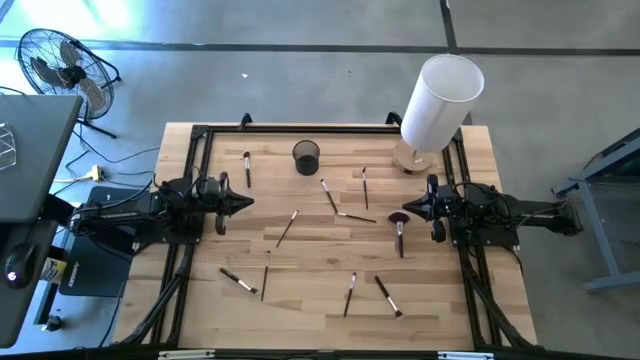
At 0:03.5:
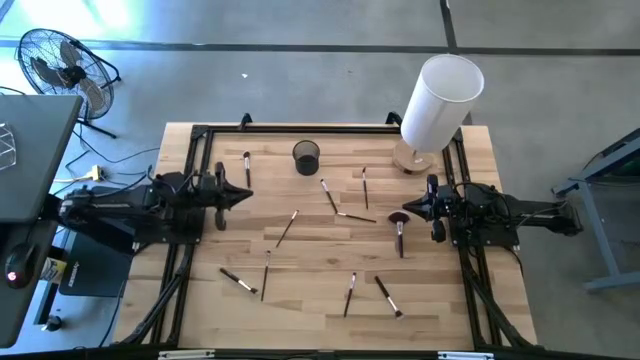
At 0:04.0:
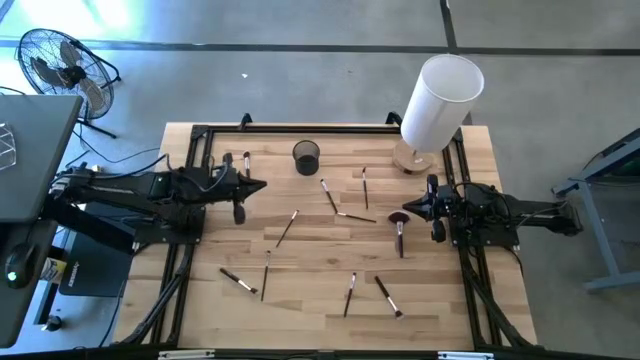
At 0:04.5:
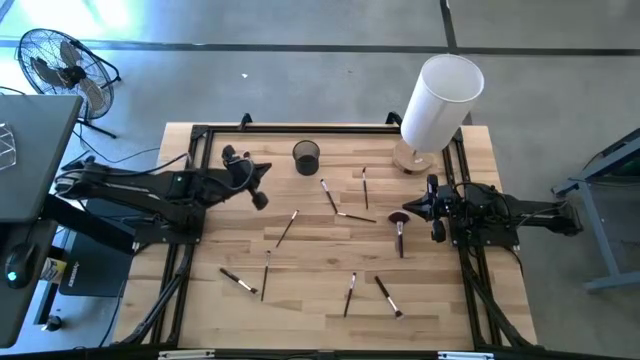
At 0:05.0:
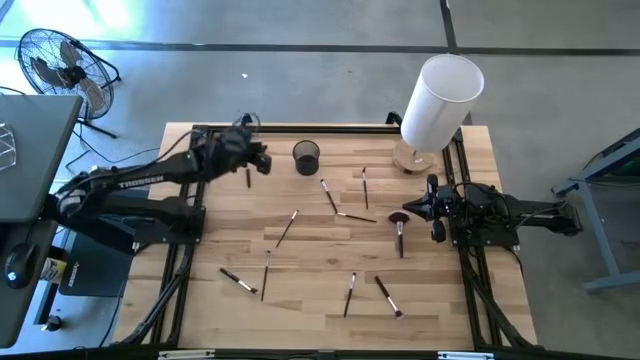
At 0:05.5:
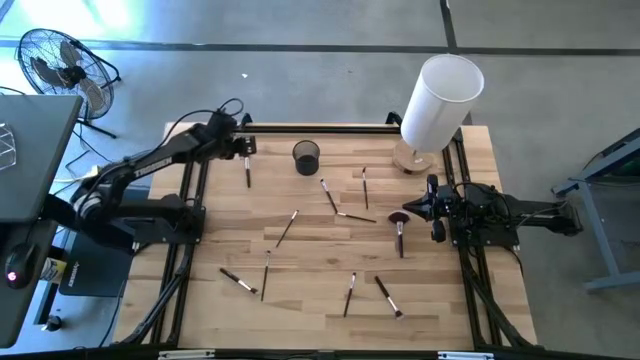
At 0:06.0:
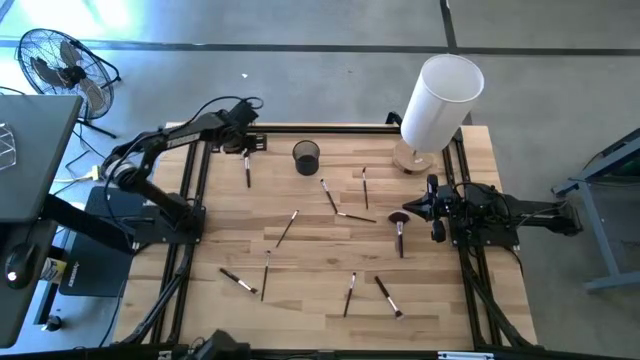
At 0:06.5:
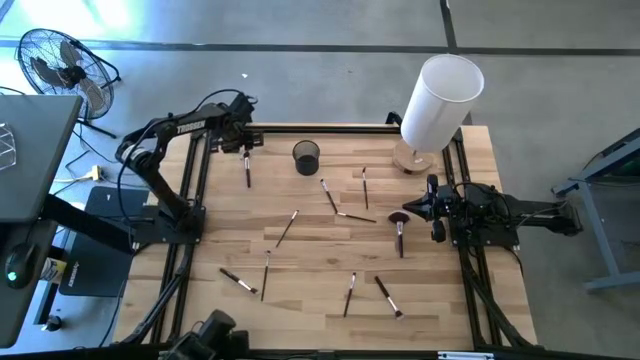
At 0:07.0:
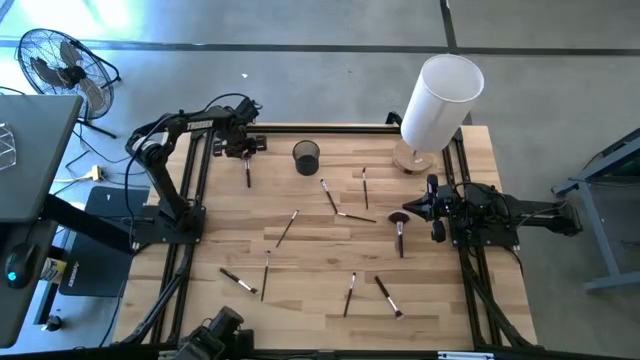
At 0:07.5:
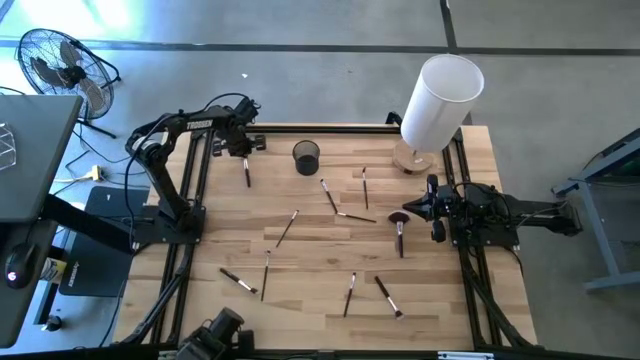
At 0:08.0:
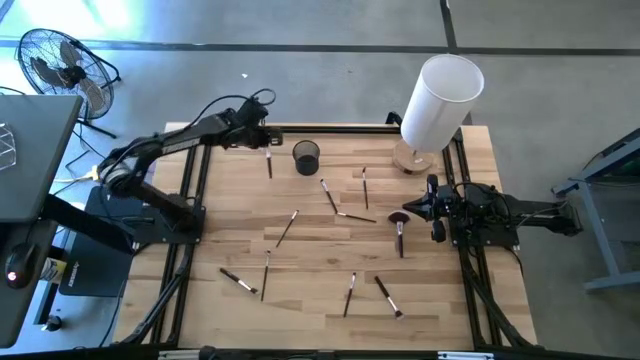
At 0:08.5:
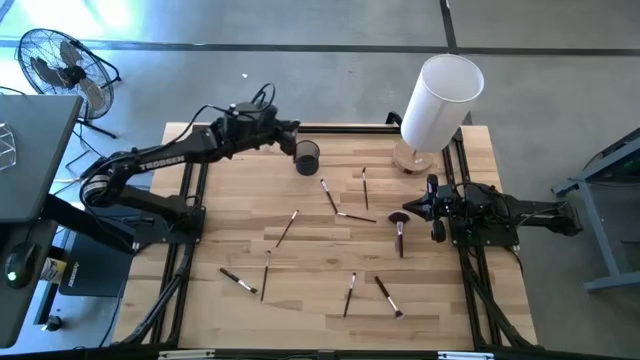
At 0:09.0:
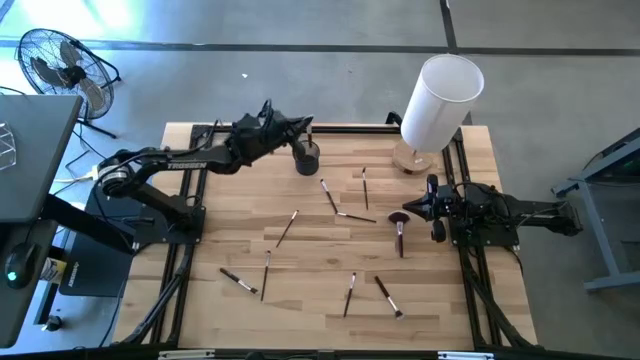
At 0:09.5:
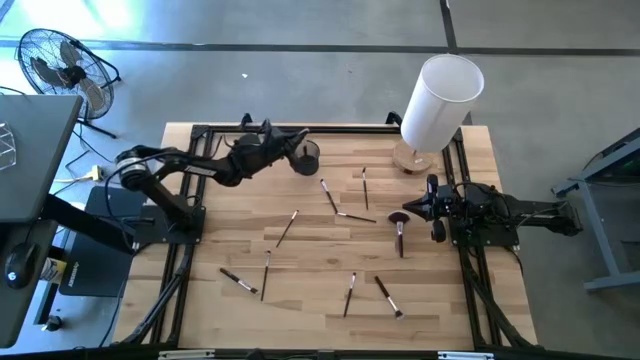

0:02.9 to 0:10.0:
Task: Put items in baskets/containers
Put the powder brush into the pen holder

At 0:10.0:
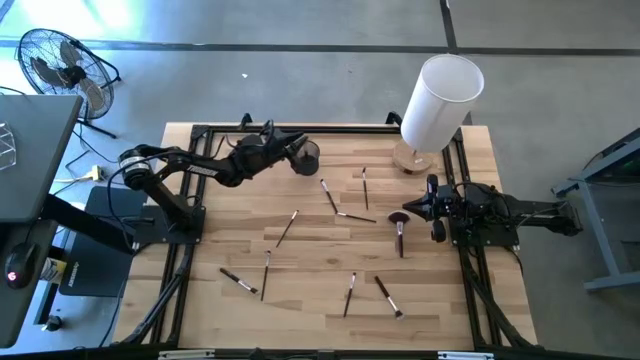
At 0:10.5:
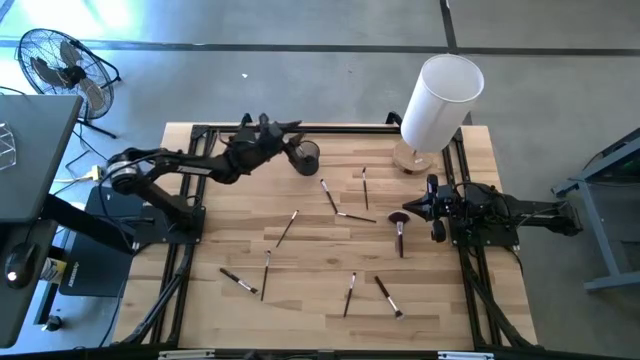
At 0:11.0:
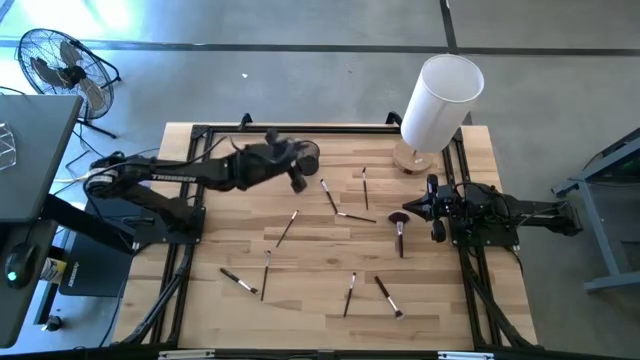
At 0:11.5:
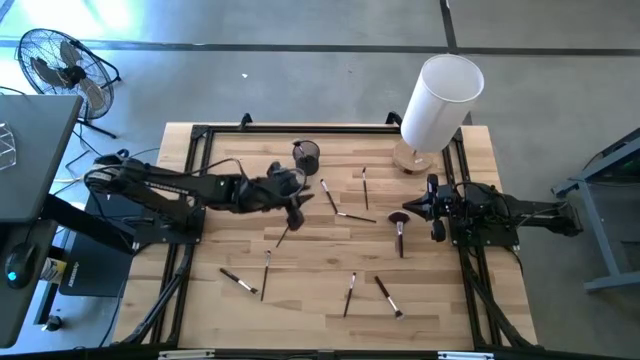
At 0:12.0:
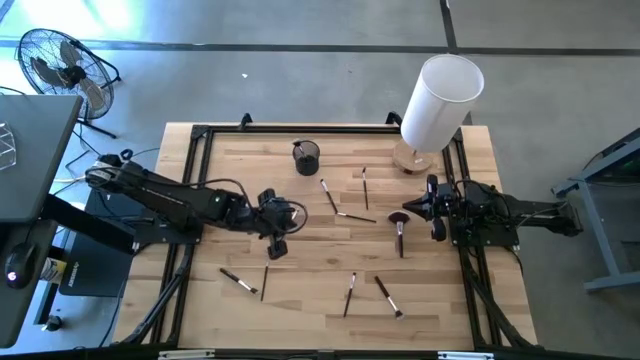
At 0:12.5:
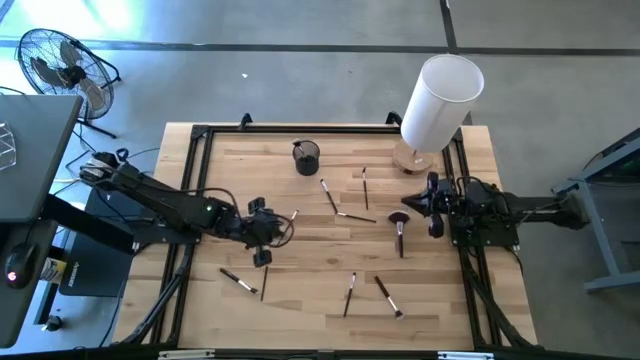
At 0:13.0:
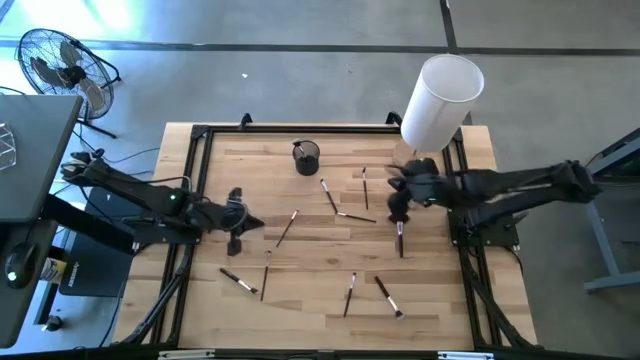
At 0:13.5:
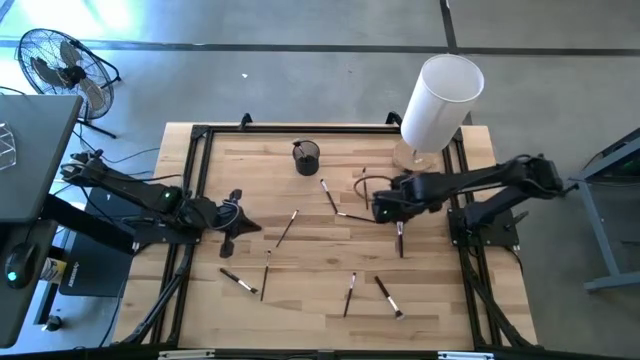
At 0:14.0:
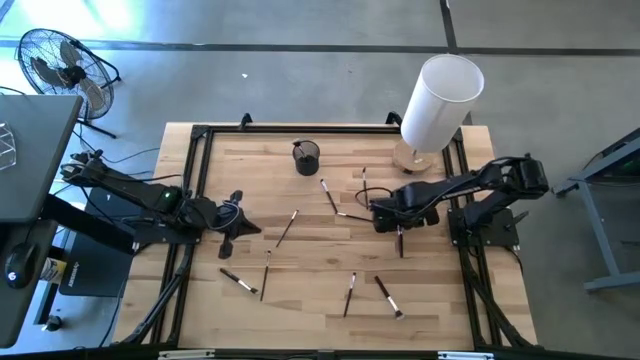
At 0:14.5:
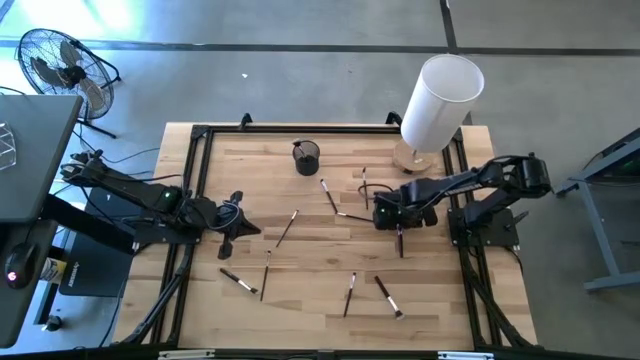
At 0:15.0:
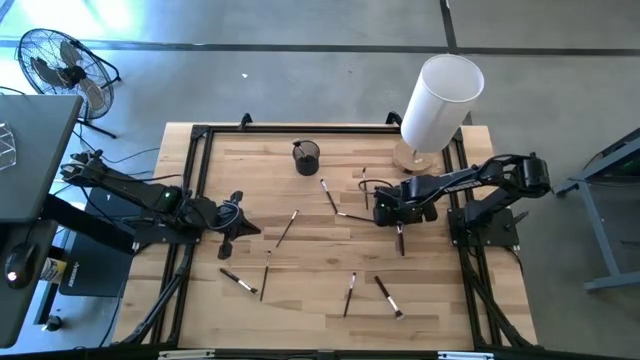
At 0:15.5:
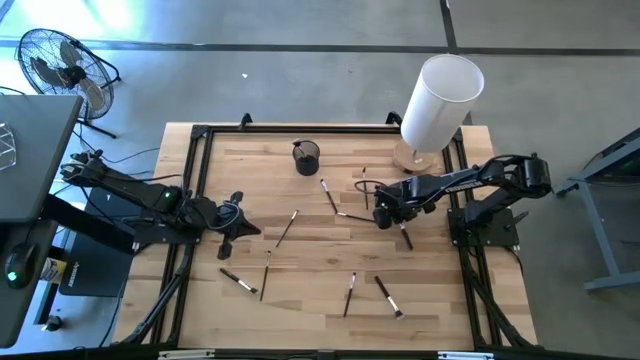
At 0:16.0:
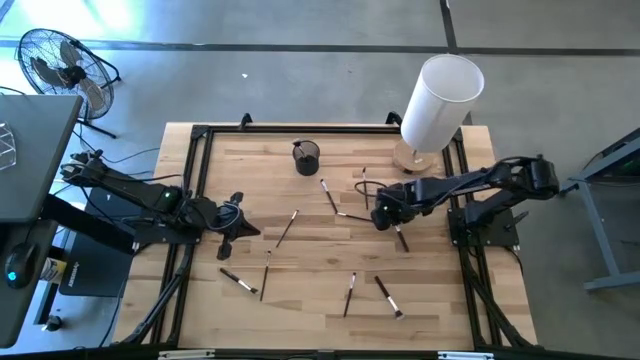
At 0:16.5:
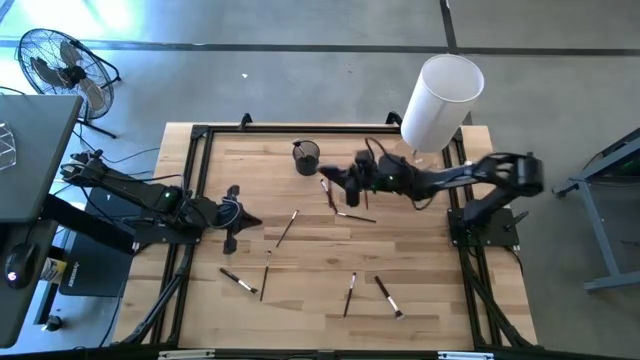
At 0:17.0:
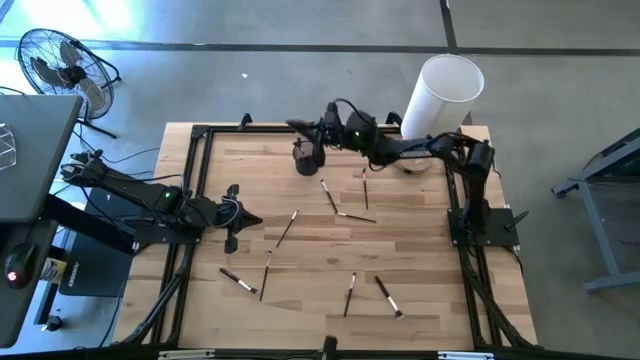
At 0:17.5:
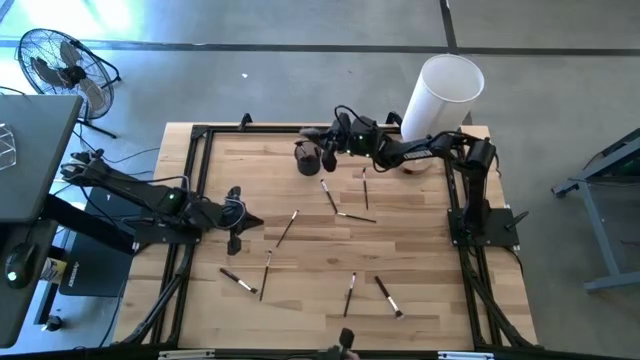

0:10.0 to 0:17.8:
Put the highlighter brush into the pen holder

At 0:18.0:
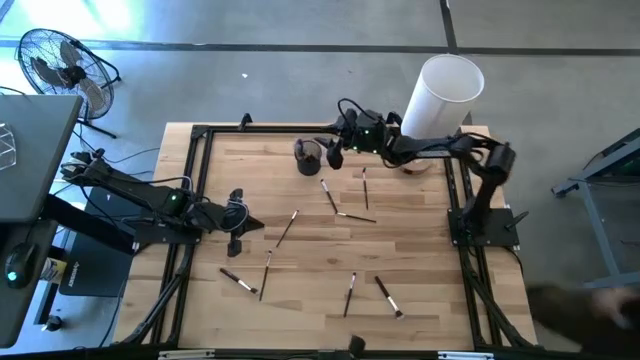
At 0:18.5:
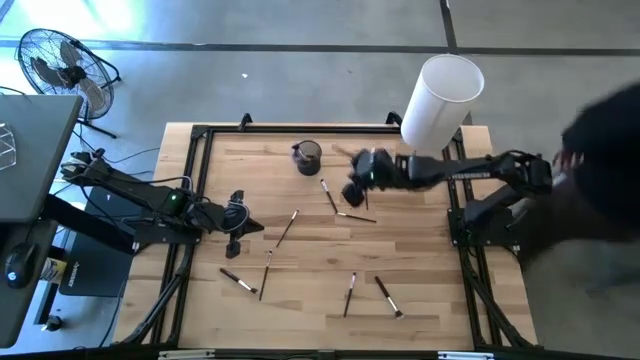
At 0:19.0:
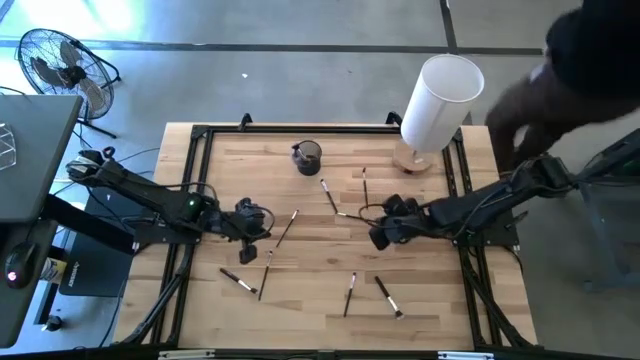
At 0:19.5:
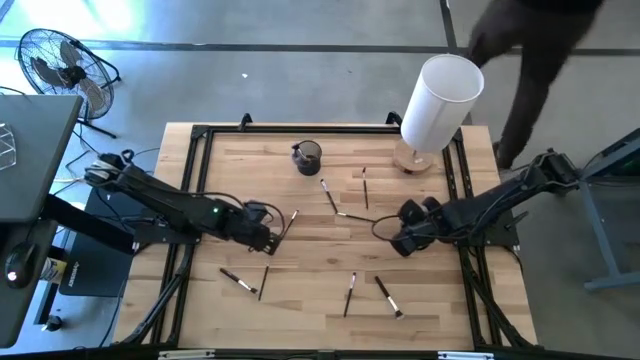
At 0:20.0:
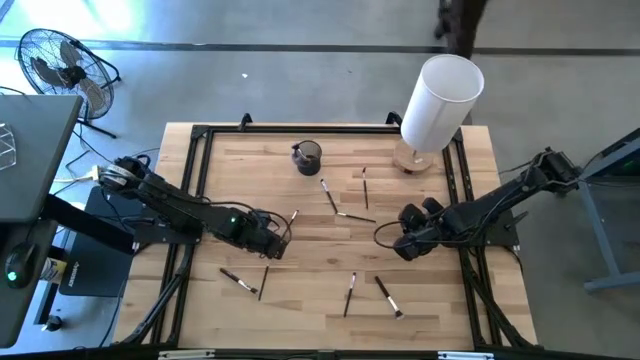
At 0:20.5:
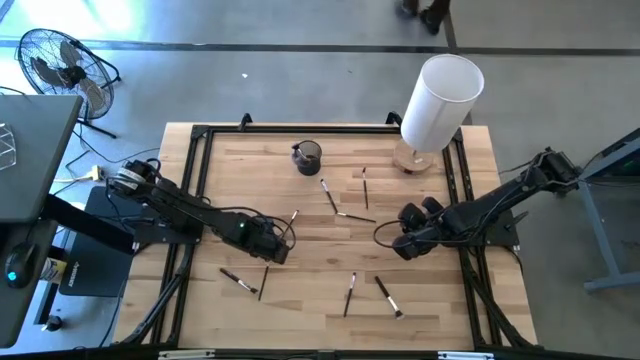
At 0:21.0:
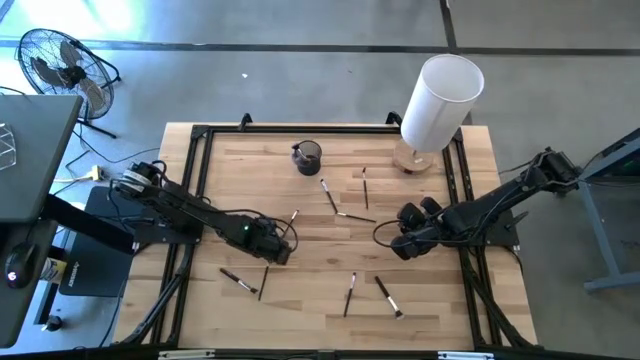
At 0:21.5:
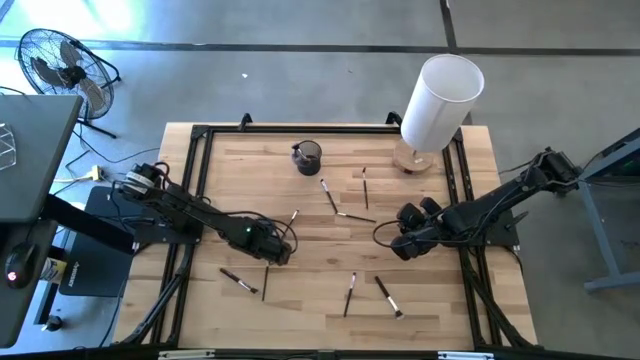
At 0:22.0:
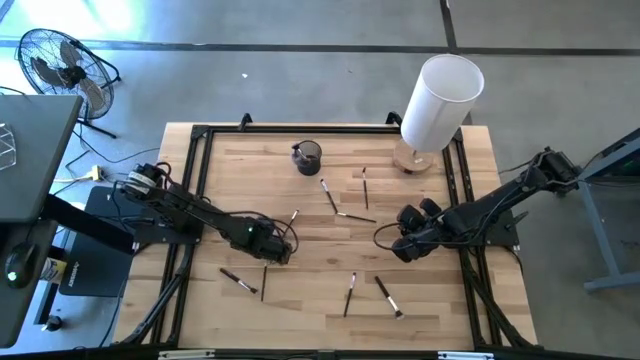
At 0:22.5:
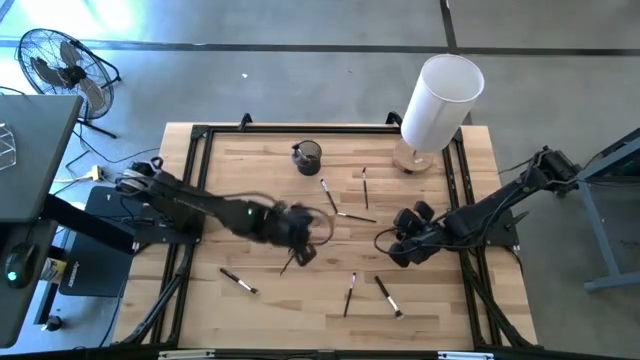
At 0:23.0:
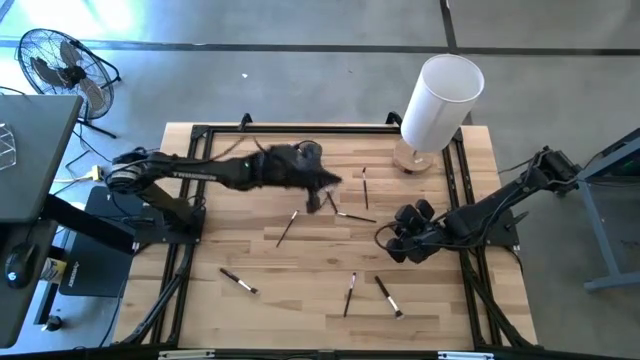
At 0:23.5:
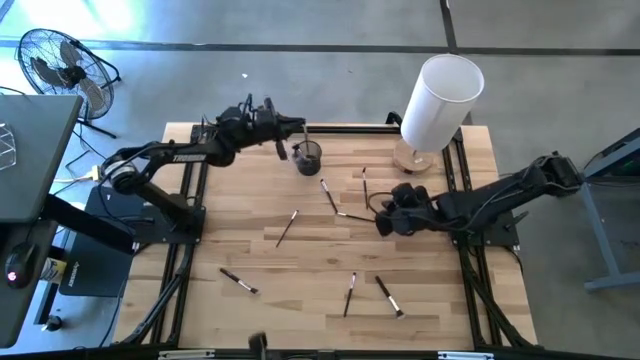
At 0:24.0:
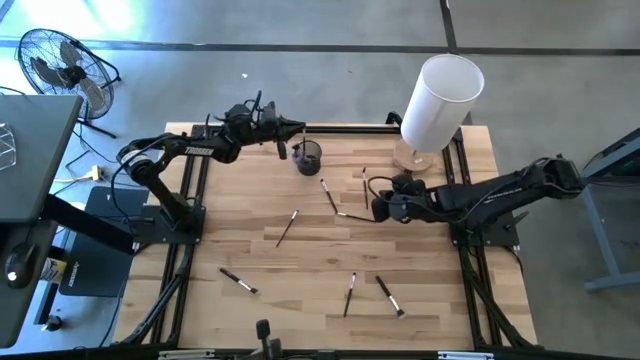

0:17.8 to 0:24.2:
Put the eyeshadow brush into the pen holder

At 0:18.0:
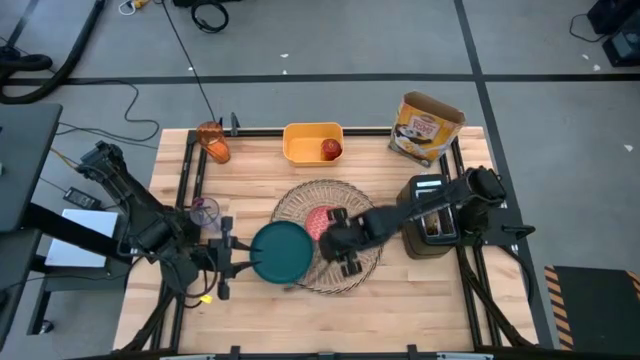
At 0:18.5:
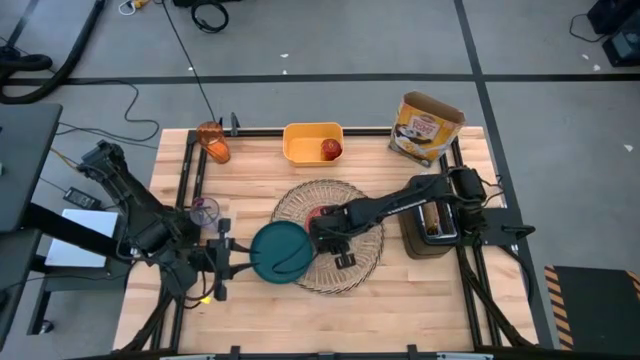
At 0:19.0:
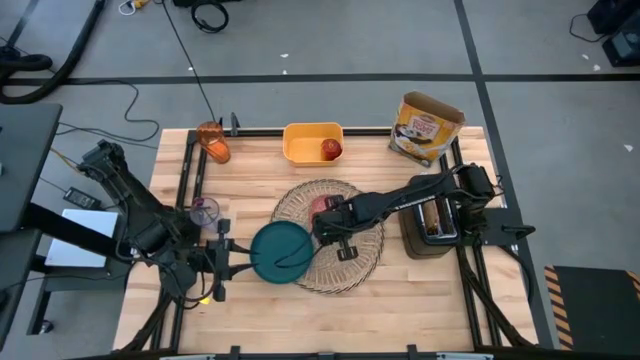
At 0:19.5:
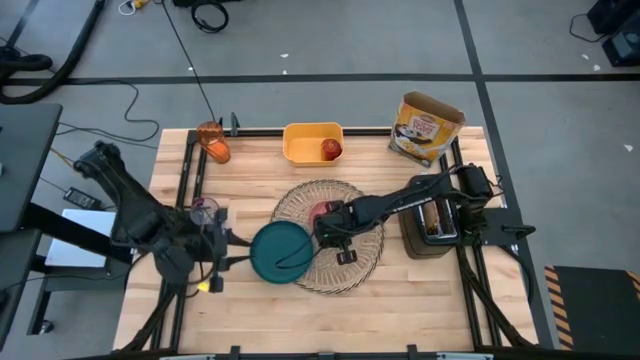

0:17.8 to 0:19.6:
Task: Arrange a breakfast setting
Adjust the red bowl on the brown table mat
